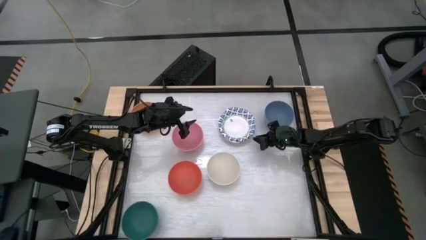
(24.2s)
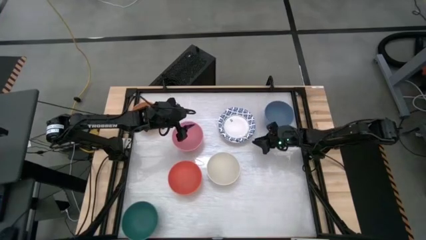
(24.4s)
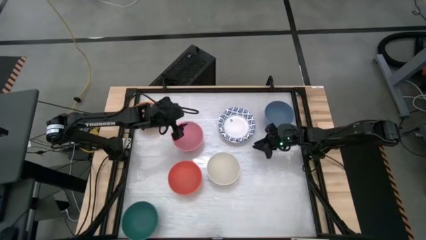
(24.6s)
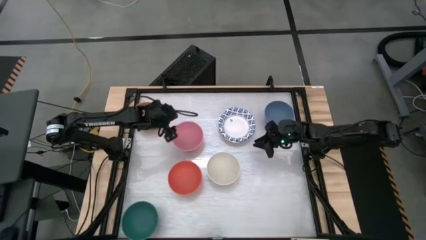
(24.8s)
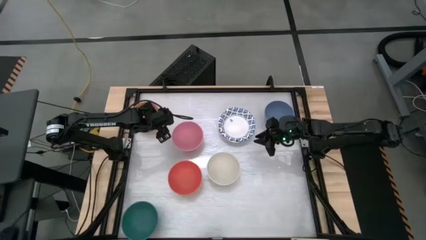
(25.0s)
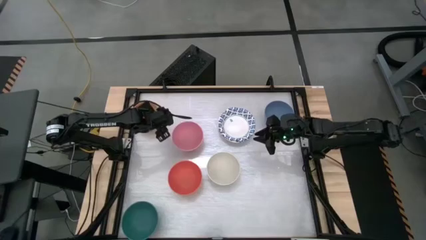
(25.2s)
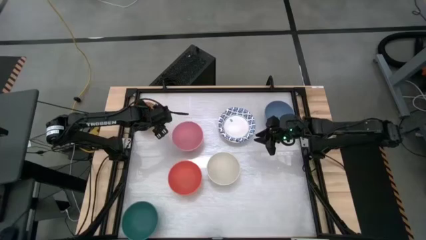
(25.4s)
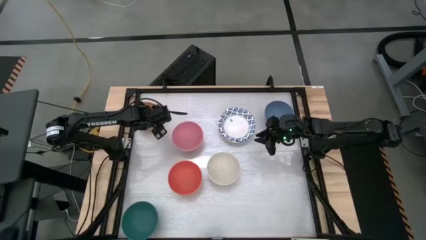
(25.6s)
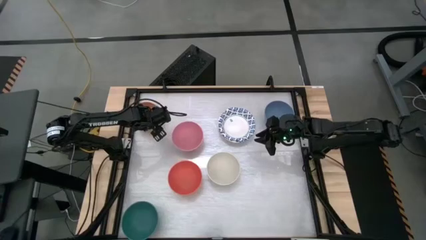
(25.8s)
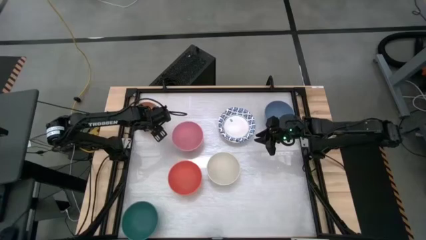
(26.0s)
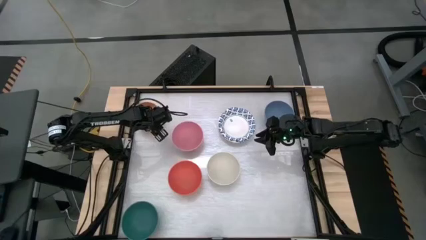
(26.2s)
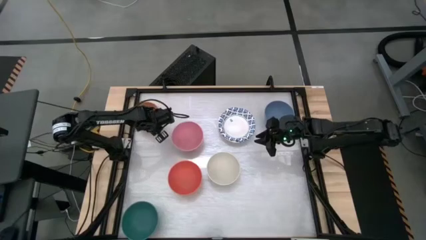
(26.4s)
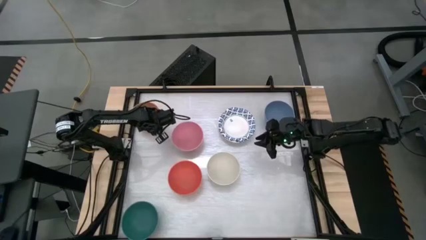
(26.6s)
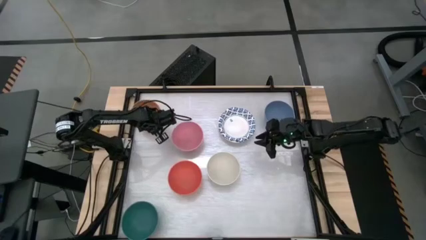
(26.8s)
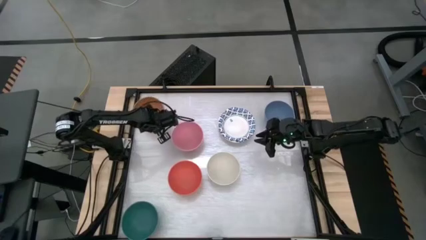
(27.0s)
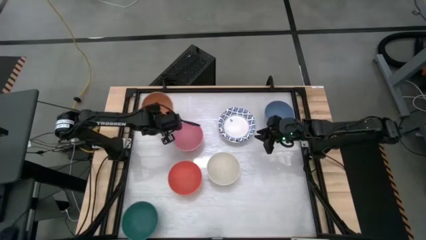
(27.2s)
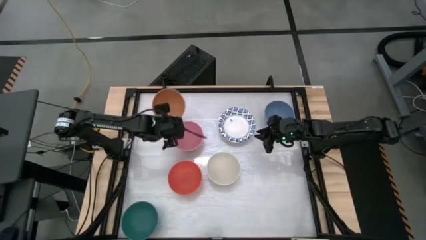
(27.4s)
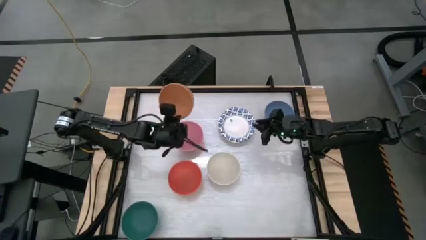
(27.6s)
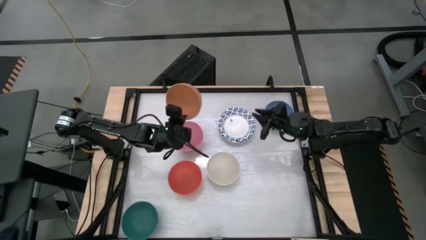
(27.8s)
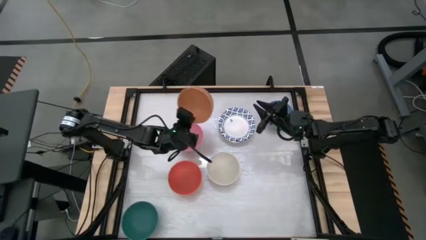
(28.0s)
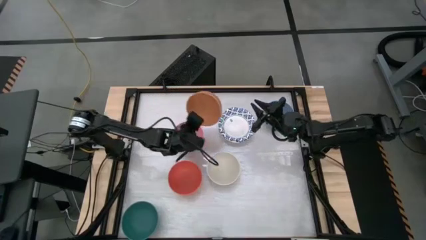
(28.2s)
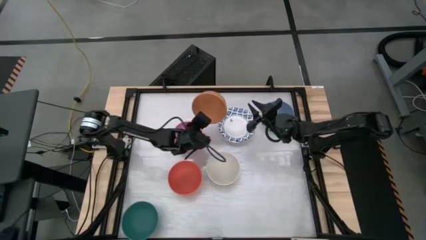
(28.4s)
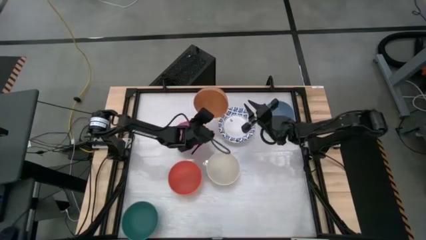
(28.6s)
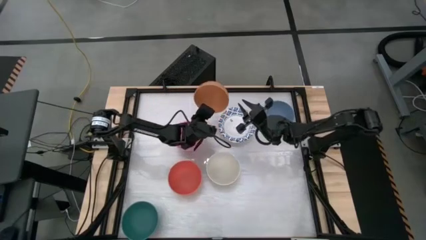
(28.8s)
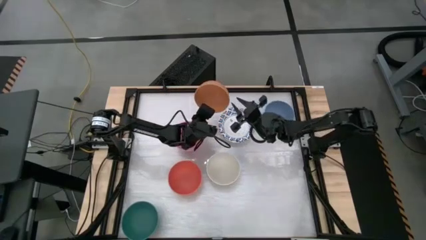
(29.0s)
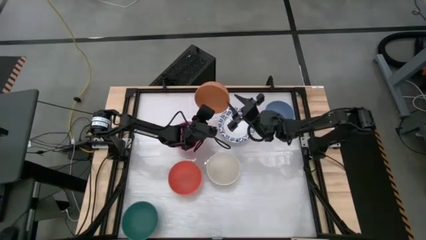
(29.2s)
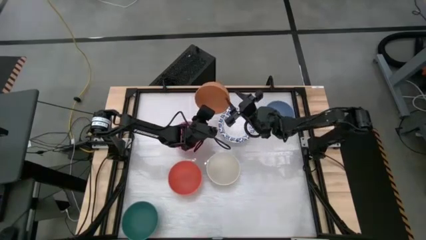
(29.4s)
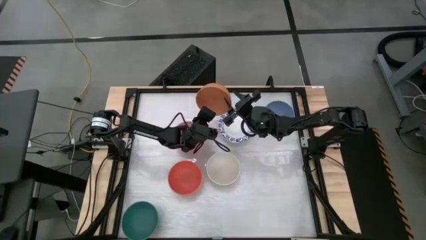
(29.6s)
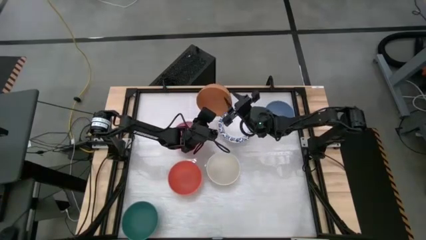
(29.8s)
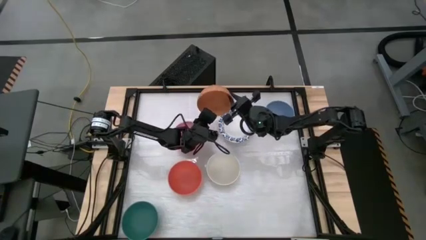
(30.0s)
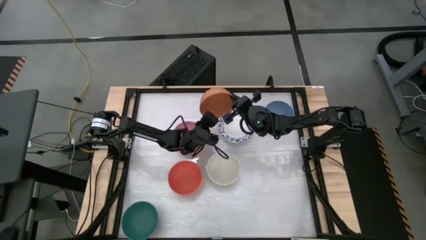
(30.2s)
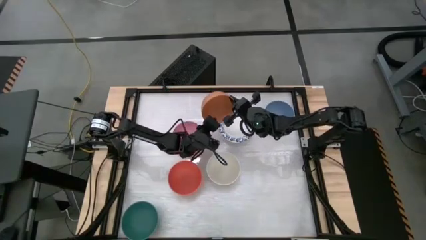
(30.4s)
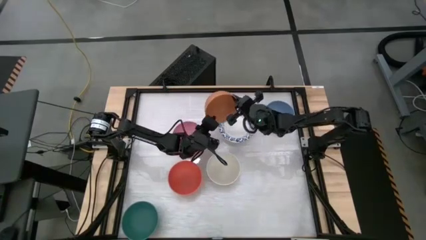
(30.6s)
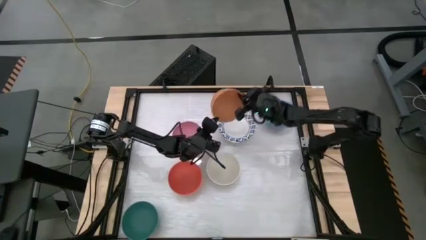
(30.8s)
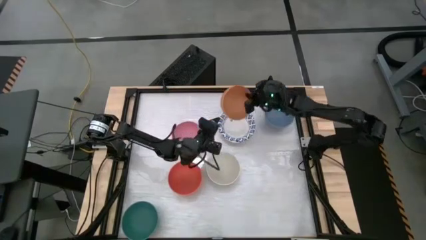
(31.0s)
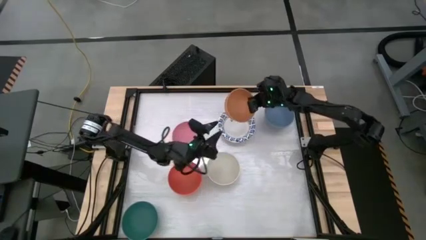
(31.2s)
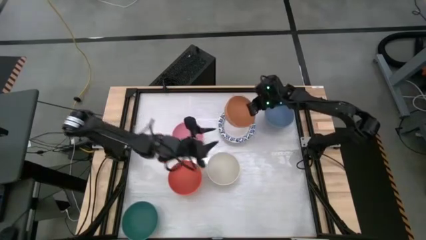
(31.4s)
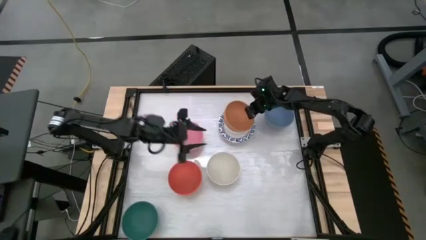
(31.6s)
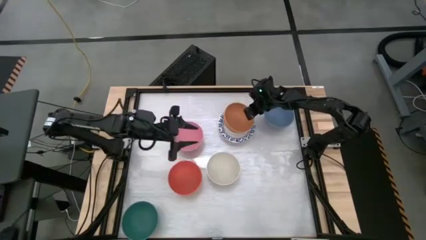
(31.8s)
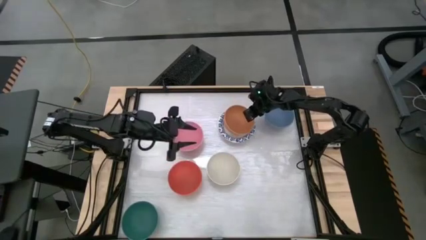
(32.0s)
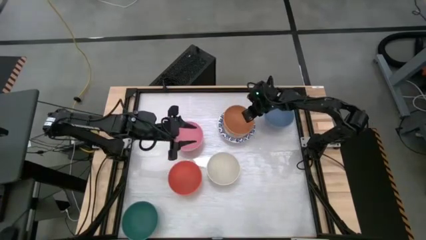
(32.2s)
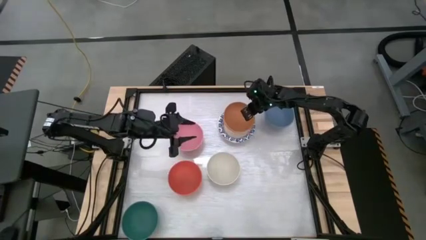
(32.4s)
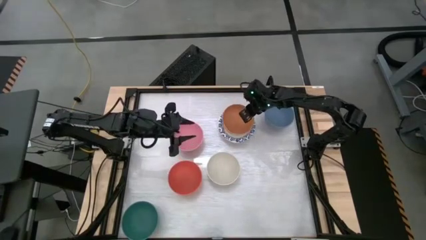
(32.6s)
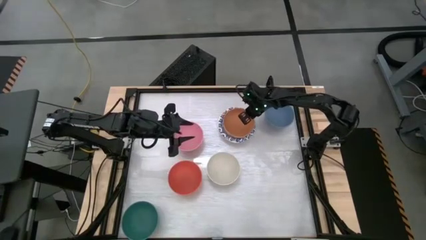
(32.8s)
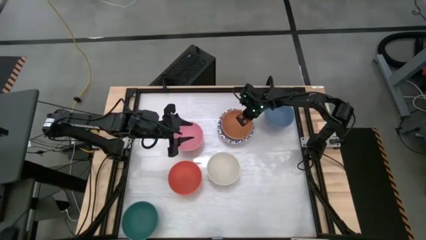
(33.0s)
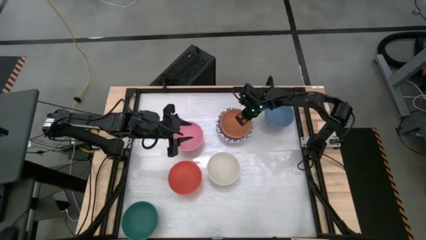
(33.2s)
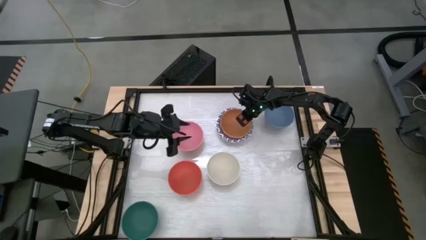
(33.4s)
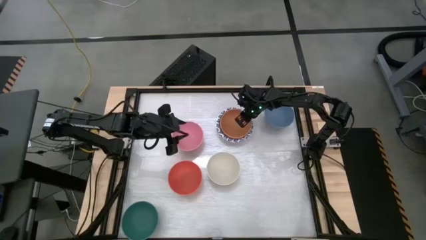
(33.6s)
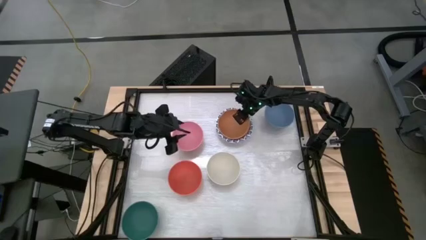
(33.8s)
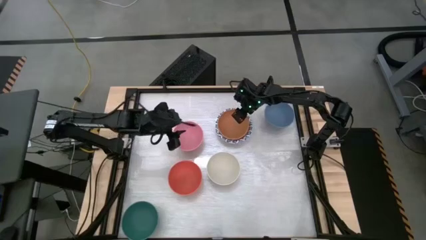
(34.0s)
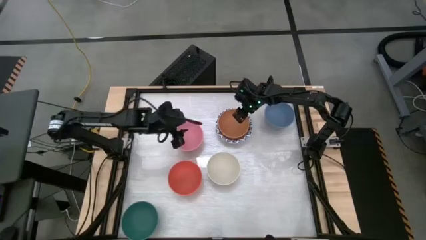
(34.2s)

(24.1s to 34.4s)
Task: Nest bowls inside each other by size order
Stack the light orange bowl on top of the blue patterned bowl

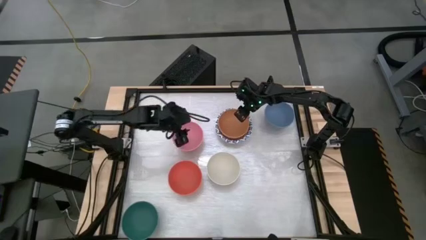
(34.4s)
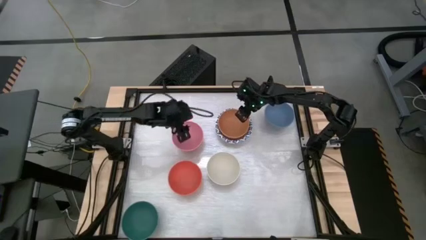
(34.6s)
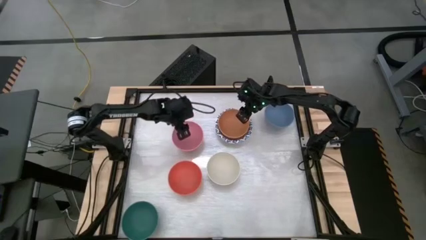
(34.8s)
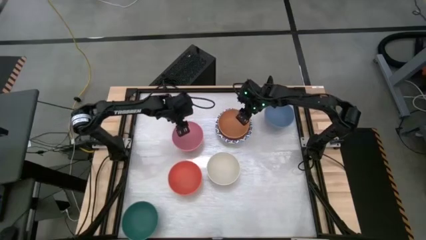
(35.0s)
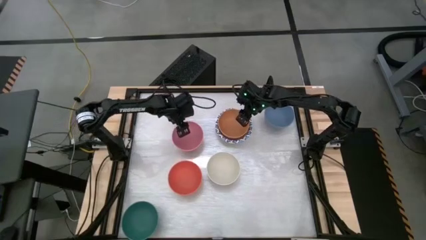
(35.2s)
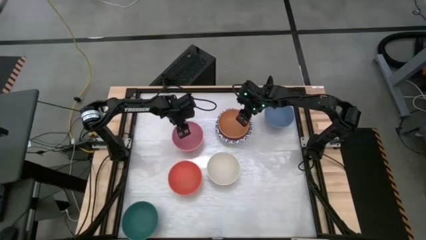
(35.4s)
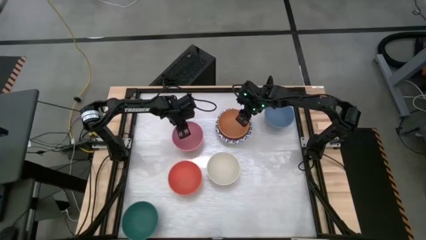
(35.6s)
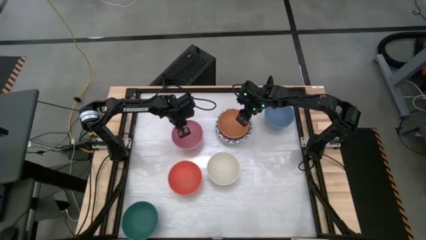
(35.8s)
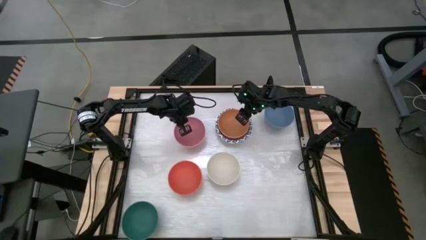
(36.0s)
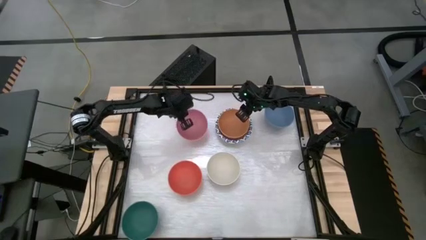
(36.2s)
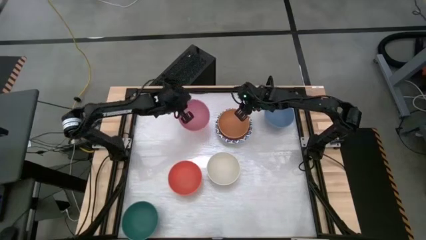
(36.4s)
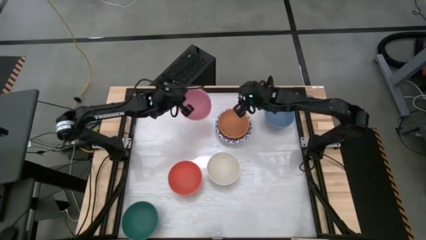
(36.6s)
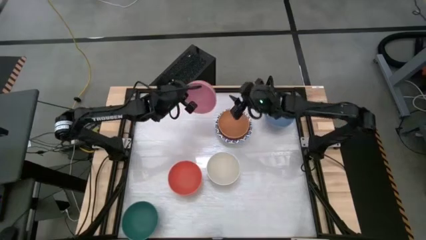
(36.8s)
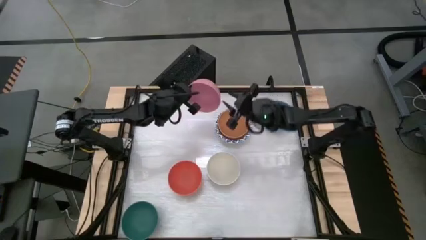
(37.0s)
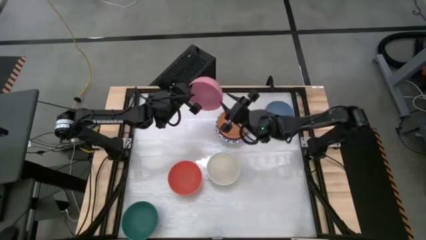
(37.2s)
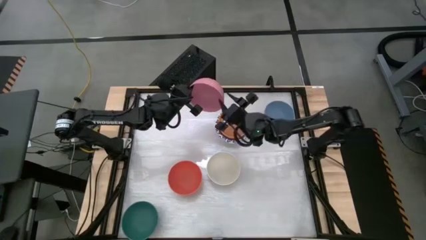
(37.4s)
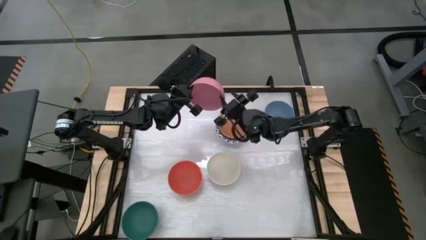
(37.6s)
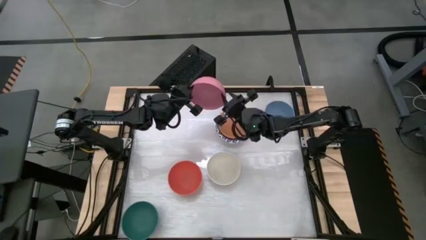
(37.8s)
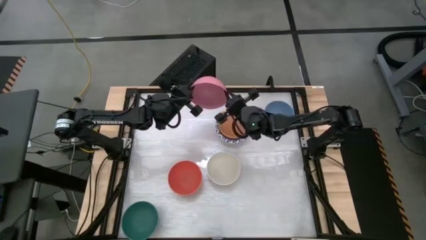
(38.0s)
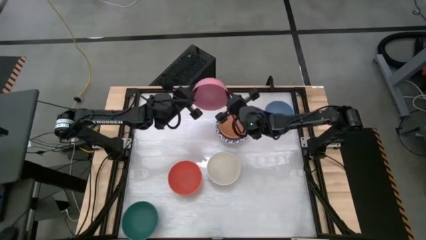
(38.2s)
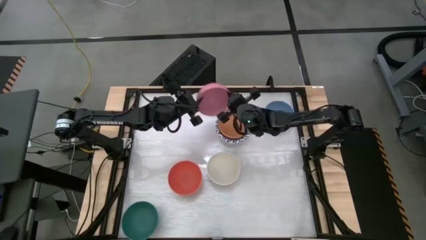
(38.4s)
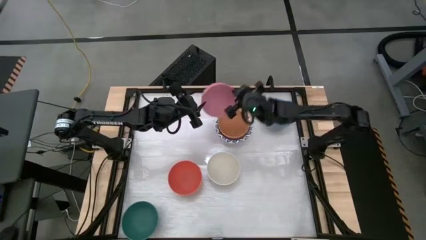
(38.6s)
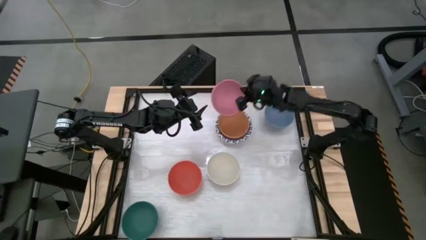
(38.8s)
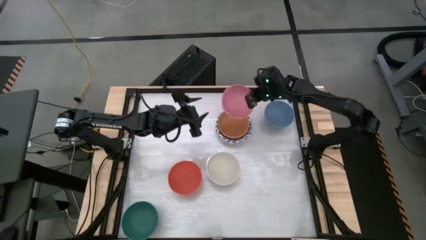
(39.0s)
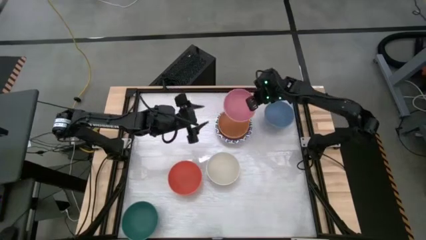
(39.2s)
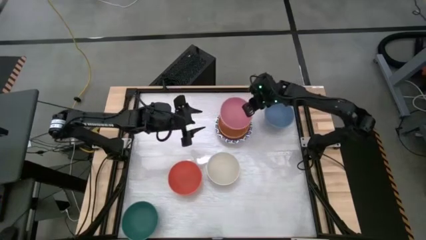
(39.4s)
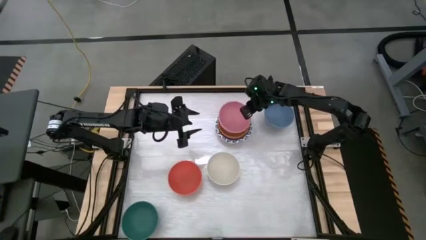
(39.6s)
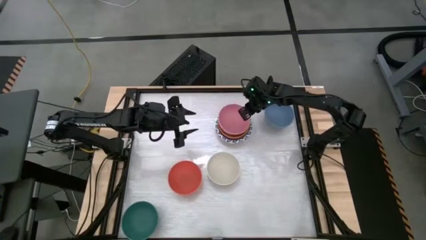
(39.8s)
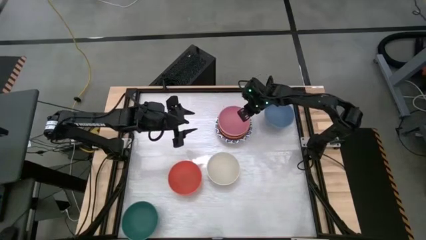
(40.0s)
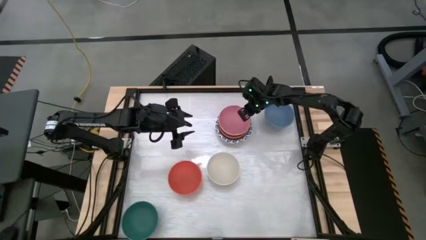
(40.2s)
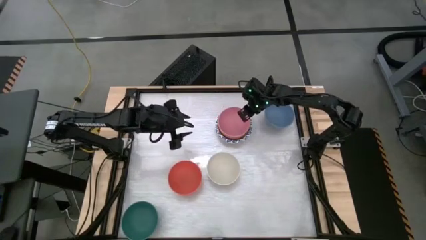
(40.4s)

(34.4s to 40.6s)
Stack the pink bowl on top of the light orange bowl
